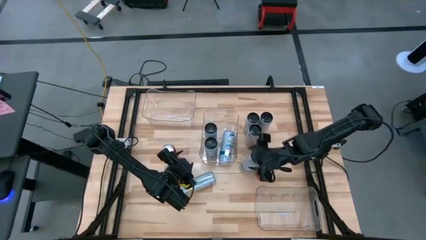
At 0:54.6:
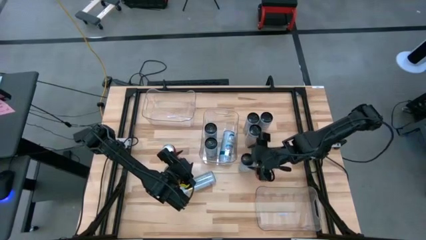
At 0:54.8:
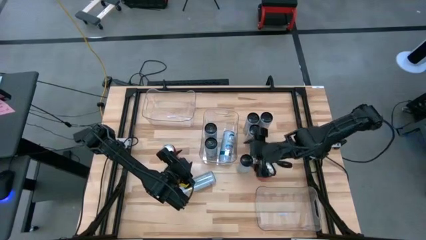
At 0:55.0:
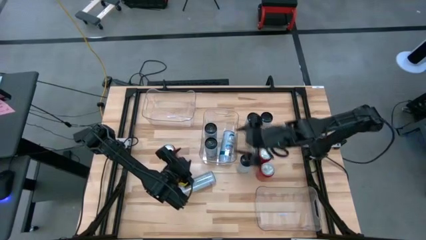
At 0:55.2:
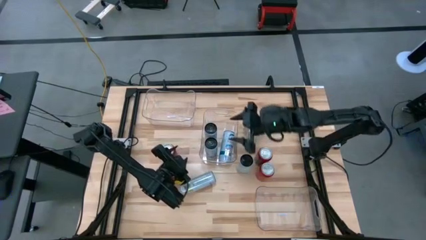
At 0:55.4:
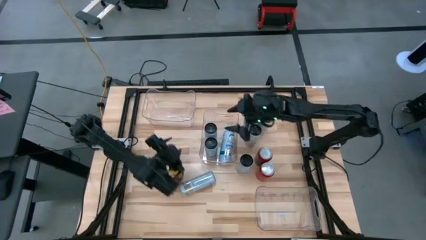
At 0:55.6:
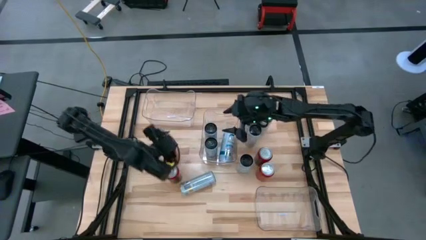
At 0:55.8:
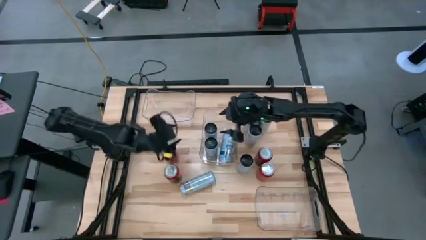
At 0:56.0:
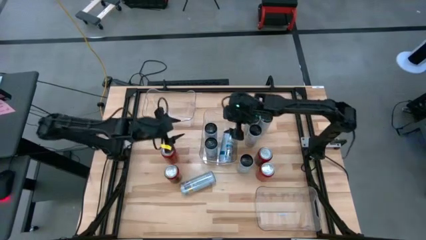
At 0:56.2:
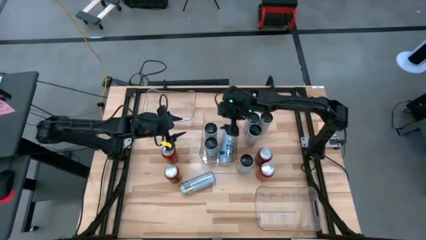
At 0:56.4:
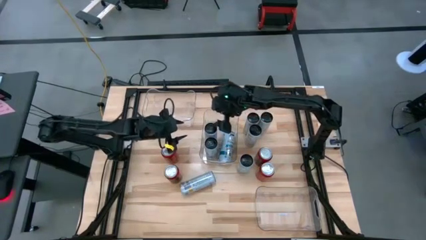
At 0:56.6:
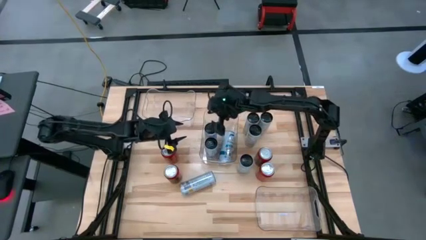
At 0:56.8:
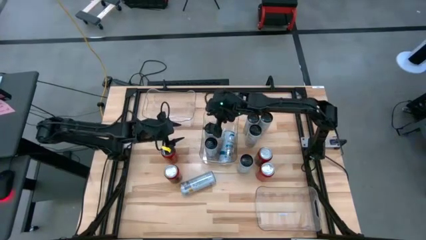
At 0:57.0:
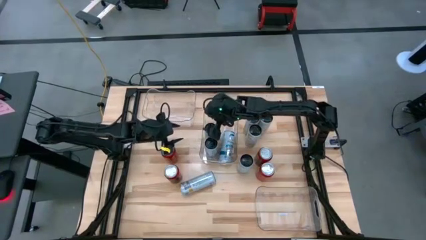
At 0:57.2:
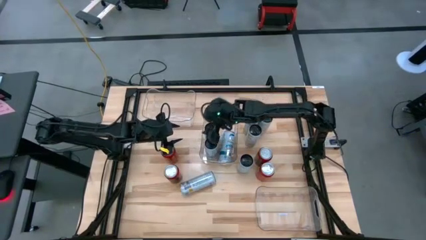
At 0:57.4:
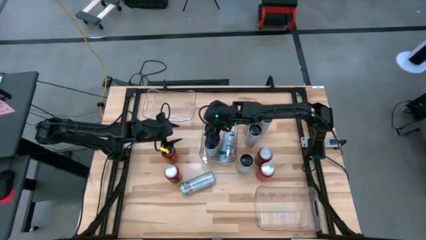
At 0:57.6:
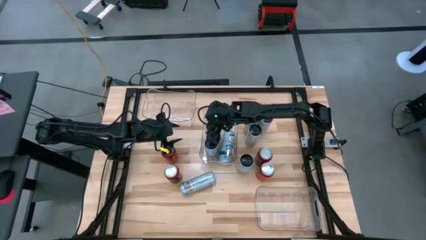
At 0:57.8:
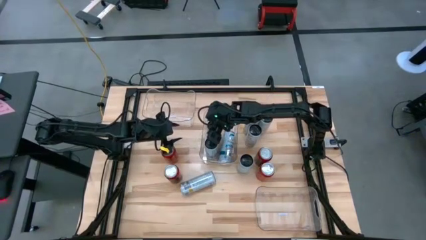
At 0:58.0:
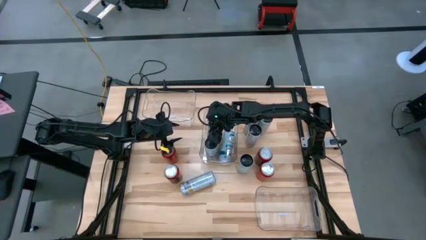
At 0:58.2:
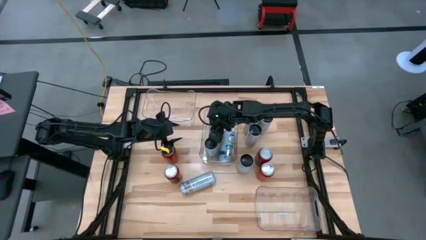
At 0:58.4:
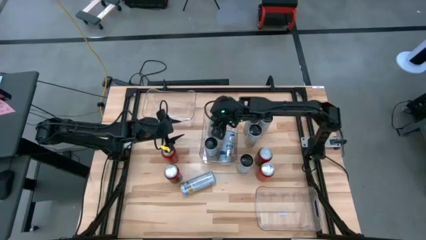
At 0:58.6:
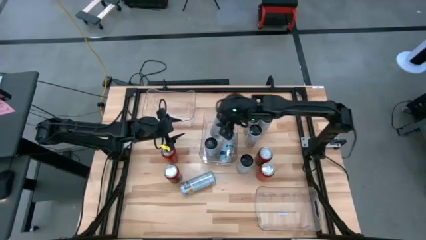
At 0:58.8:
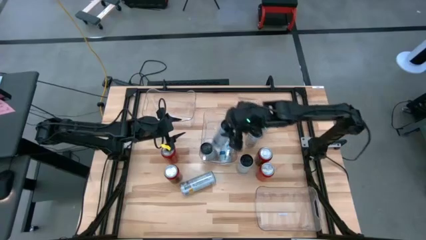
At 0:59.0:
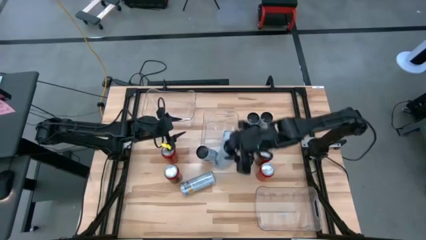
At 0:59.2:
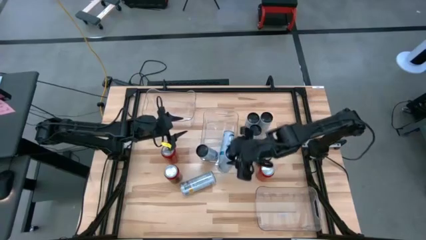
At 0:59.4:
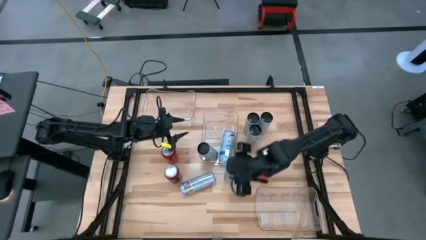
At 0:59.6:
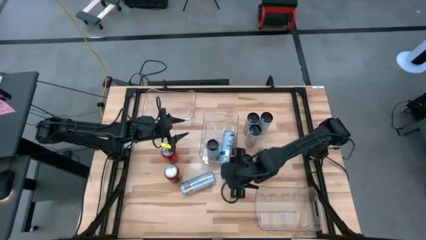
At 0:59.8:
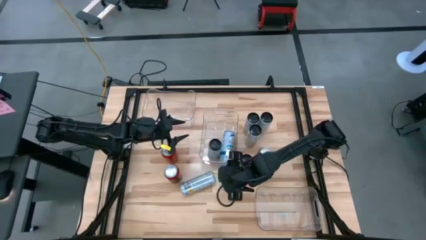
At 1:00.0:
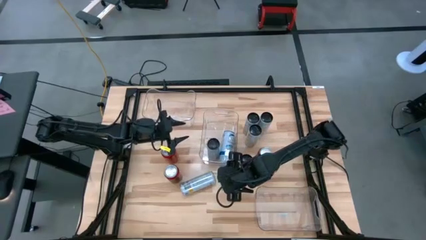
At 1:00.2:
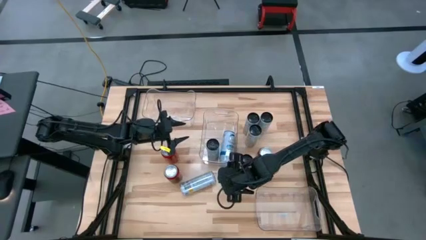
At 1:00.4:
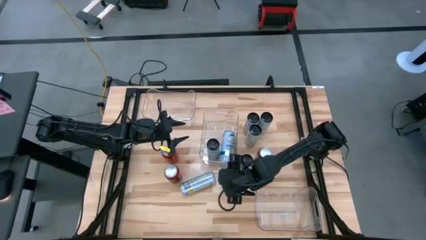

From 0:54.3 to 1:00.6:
Task: Sort soda cans
Remove the white blue soda can from the middle transparent bin

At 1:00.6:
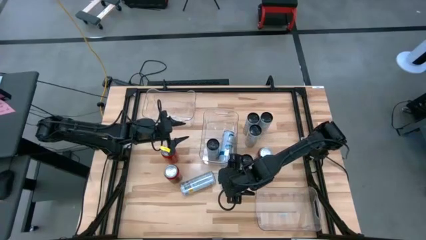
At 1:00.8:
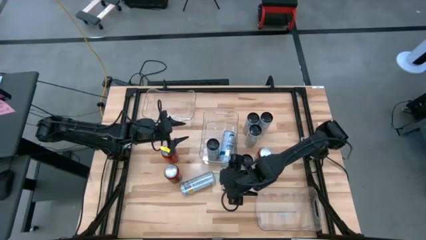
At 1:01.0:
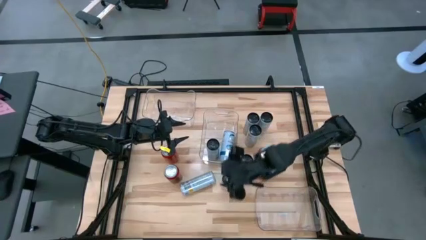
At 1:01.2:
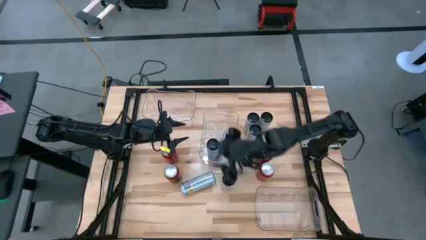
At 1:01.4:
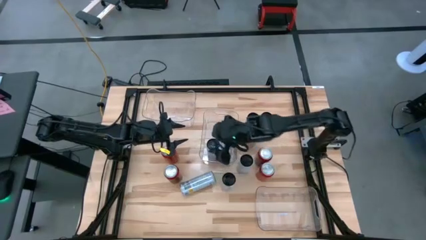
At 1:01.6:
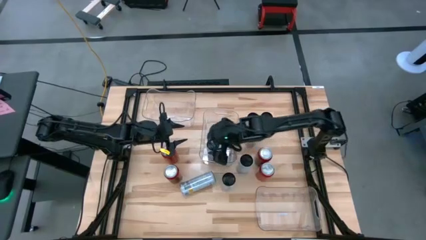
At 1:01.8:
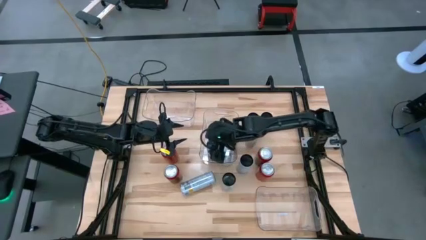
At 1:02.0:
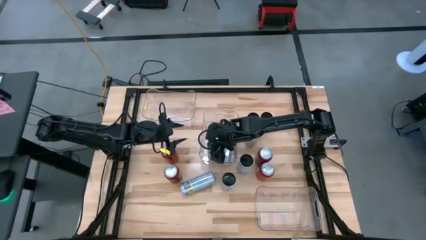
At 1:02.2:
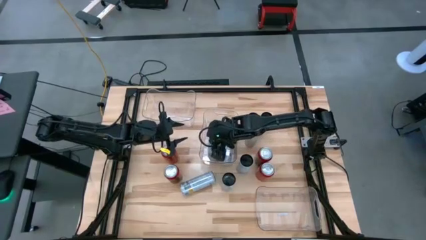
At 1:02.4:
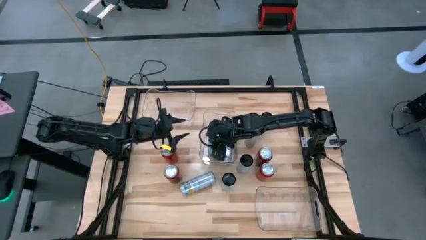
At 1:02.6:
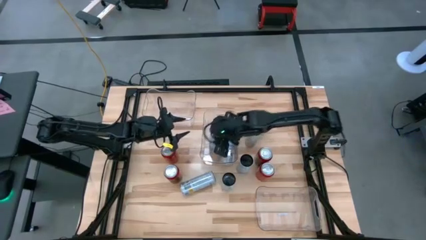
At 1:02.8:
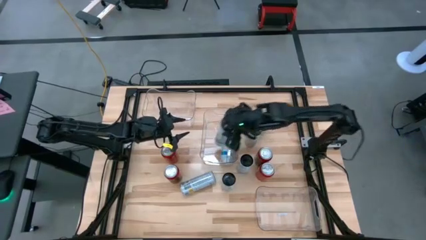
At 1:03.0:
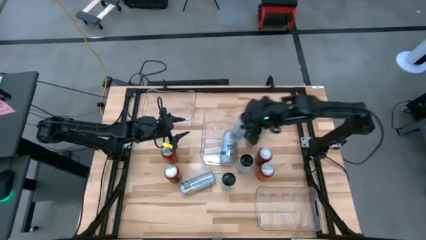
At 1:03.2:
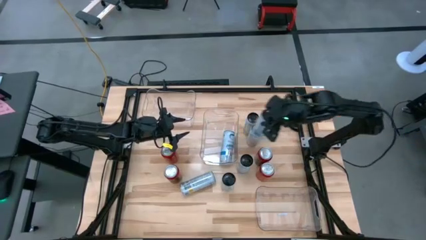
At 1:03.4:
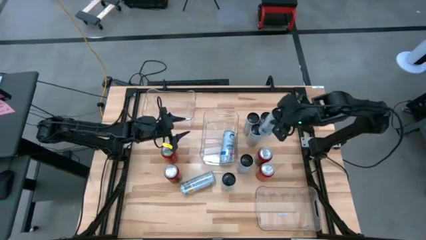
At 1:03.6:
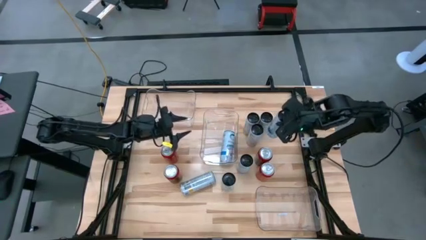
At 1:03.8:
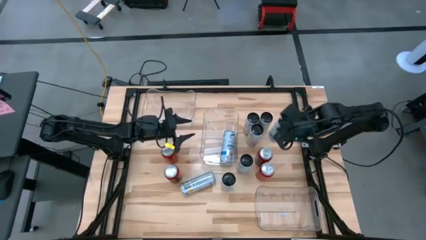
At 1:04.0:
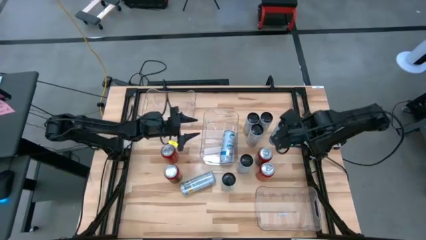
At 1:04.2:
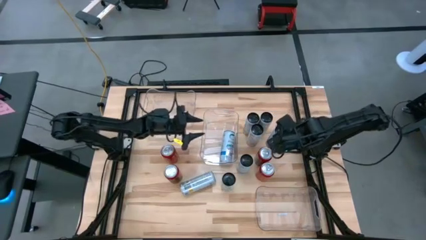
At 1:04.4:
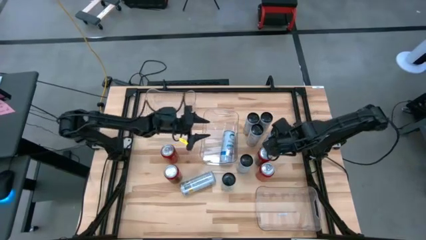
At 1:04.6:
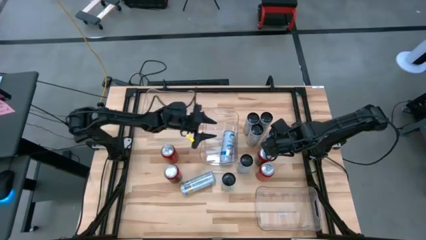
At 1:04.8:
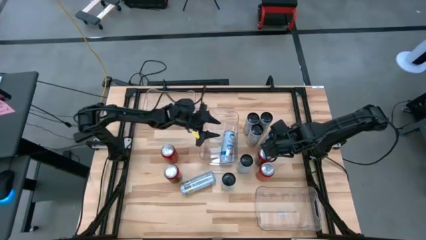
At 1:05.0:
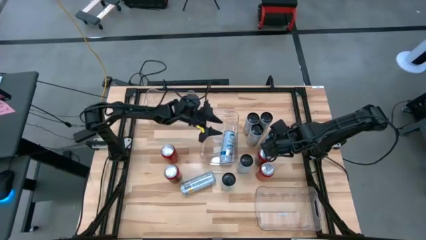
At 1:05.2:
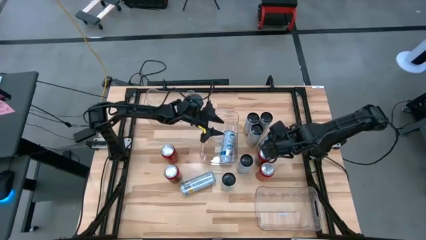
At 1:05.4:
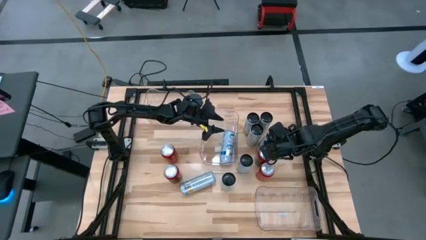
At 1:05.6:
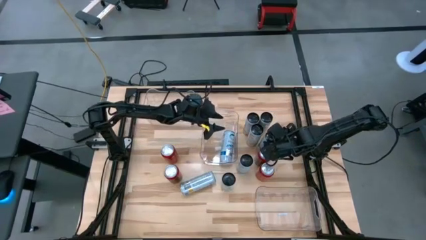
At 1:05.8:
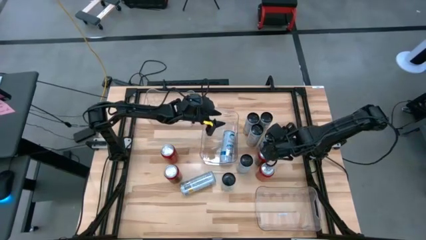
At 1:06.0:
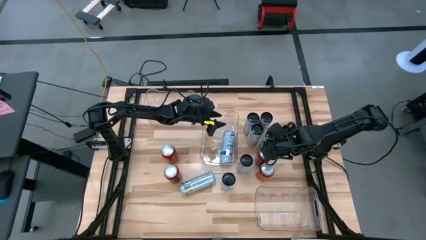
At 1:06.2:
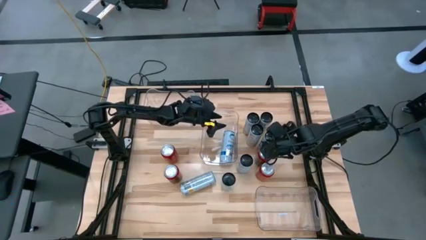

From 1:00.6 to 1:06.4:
Remove the white blue soda can from the middle transparent bin
